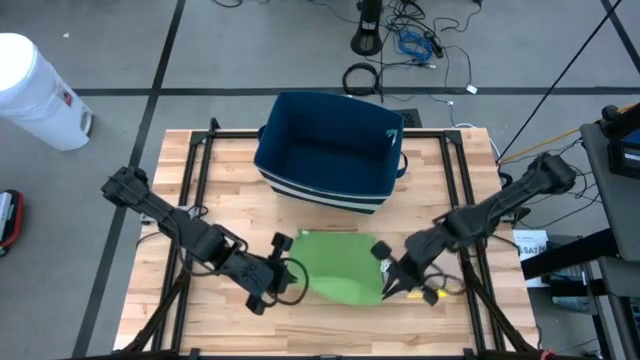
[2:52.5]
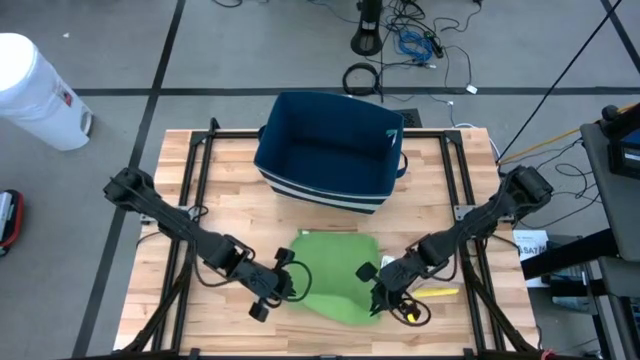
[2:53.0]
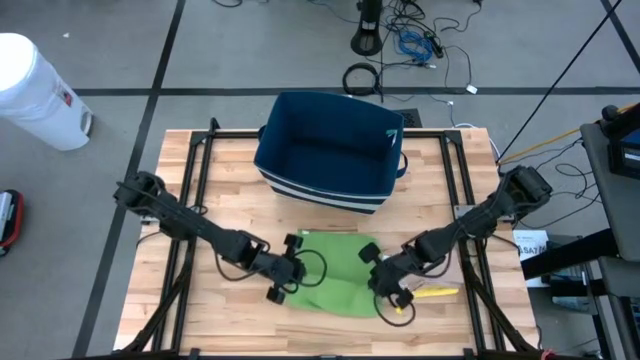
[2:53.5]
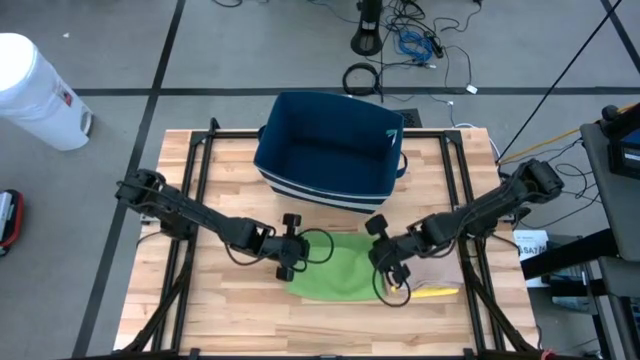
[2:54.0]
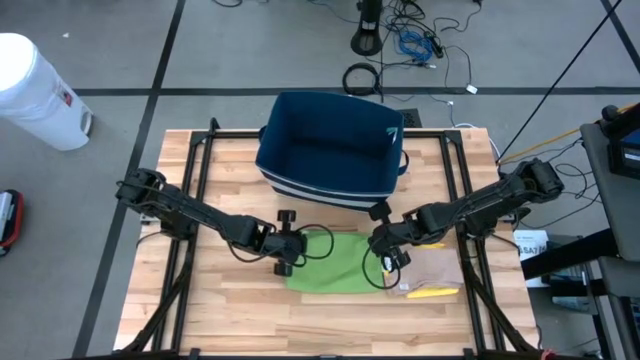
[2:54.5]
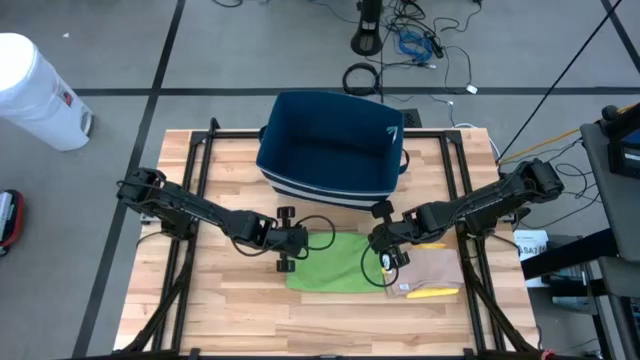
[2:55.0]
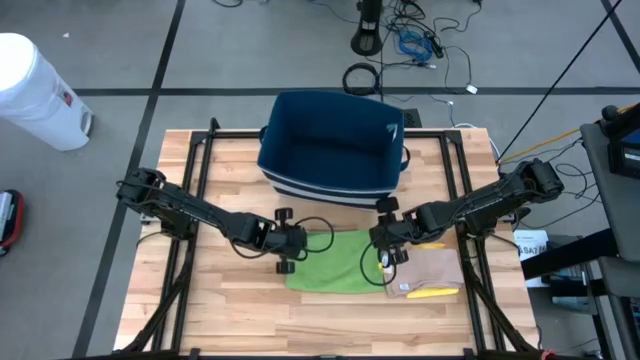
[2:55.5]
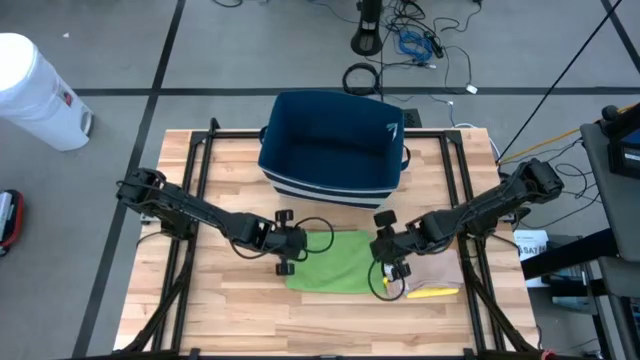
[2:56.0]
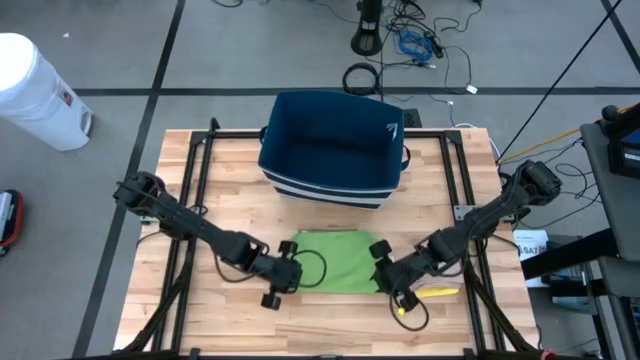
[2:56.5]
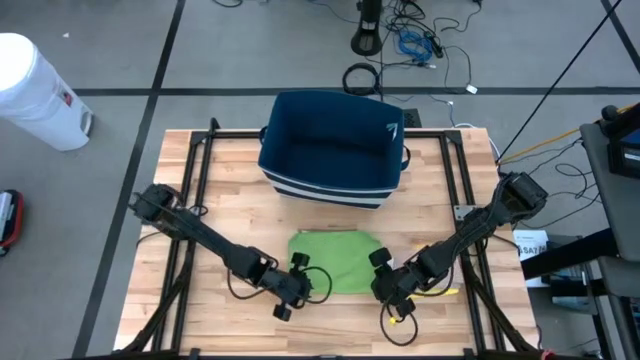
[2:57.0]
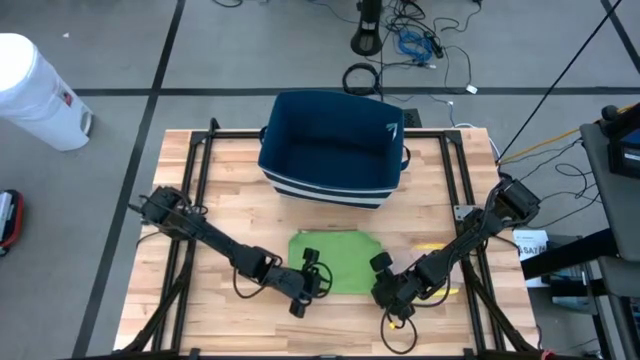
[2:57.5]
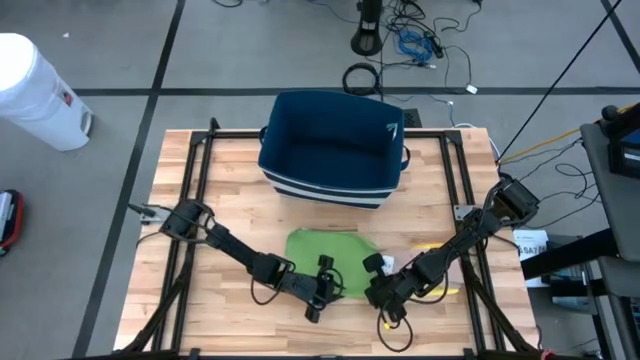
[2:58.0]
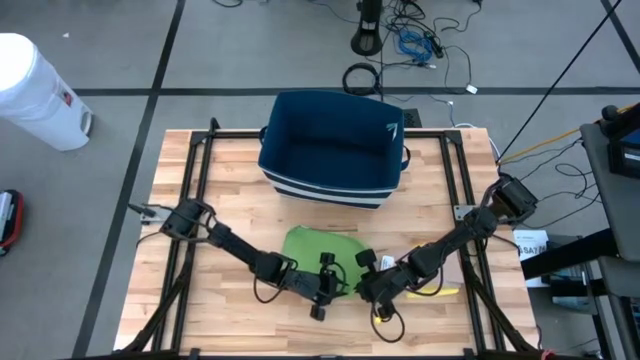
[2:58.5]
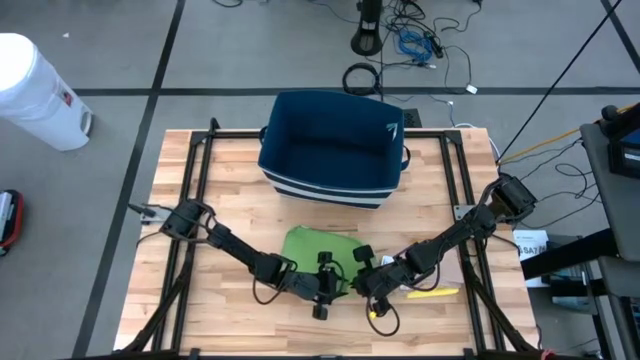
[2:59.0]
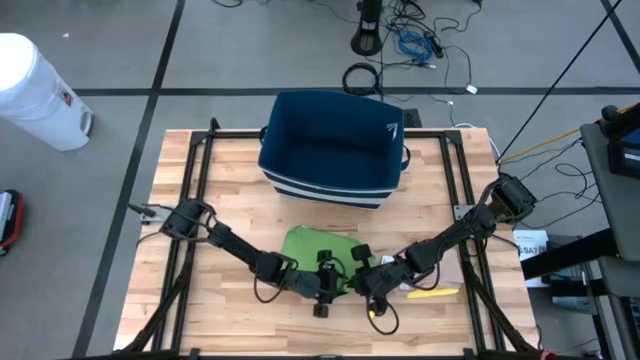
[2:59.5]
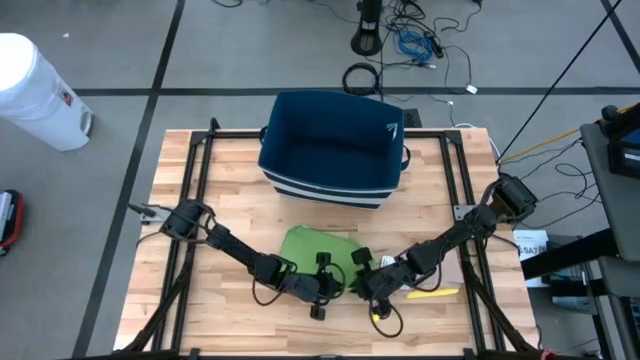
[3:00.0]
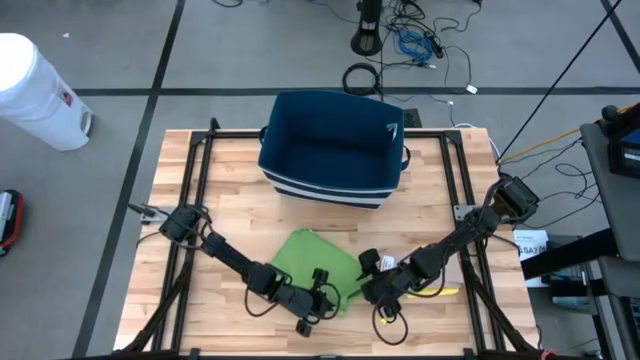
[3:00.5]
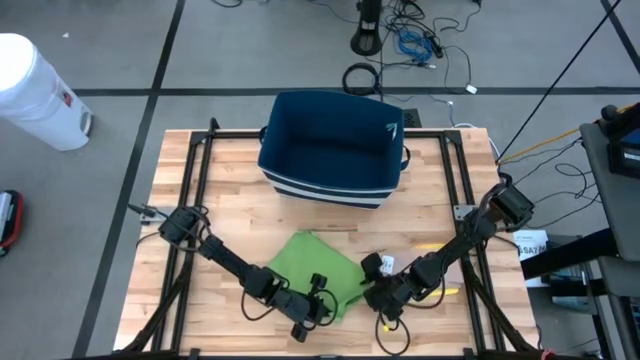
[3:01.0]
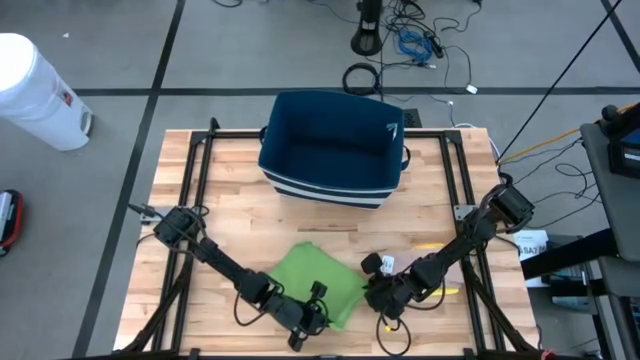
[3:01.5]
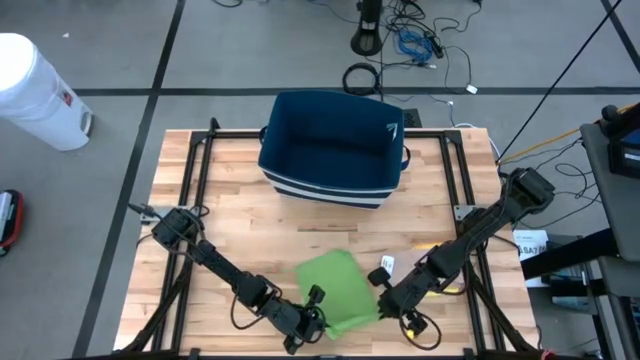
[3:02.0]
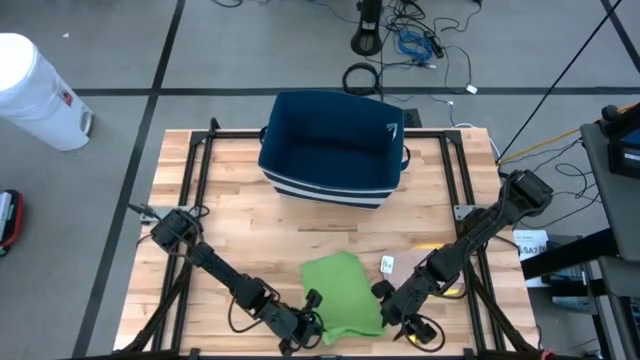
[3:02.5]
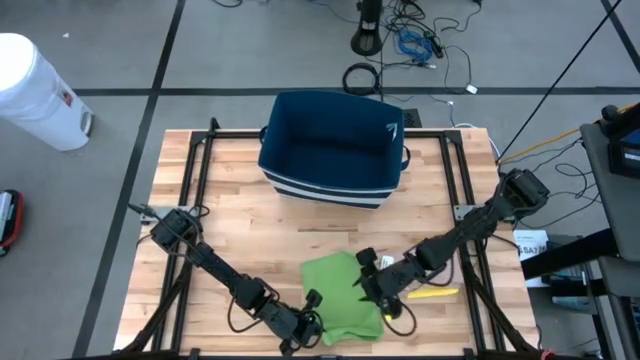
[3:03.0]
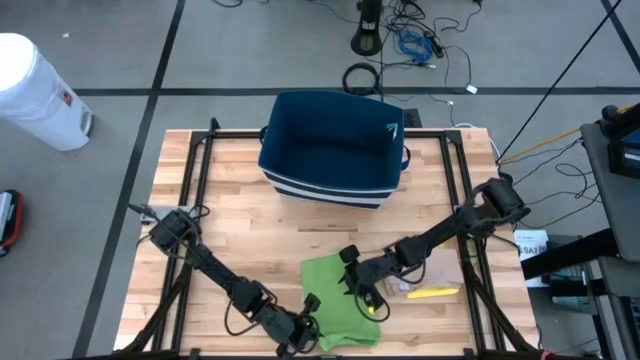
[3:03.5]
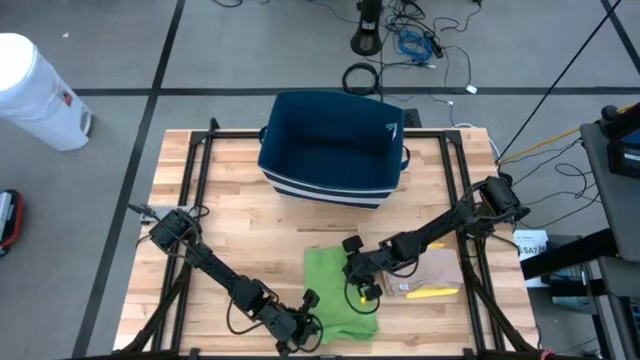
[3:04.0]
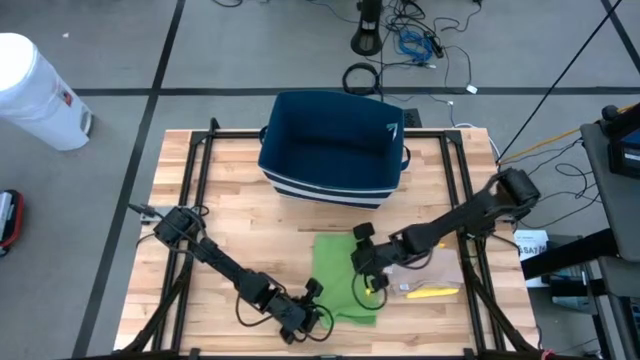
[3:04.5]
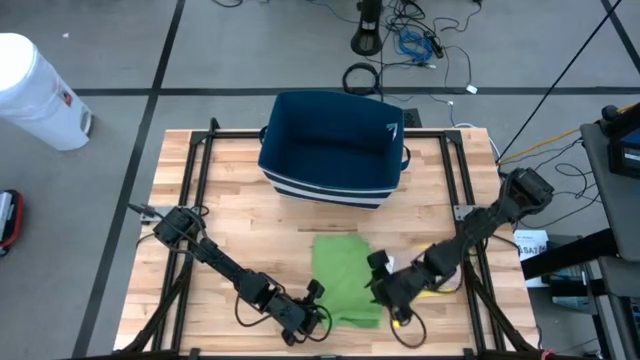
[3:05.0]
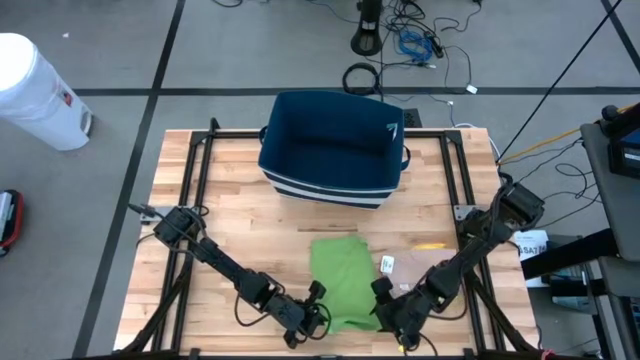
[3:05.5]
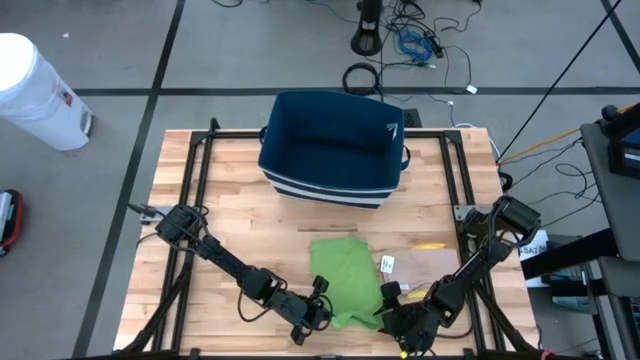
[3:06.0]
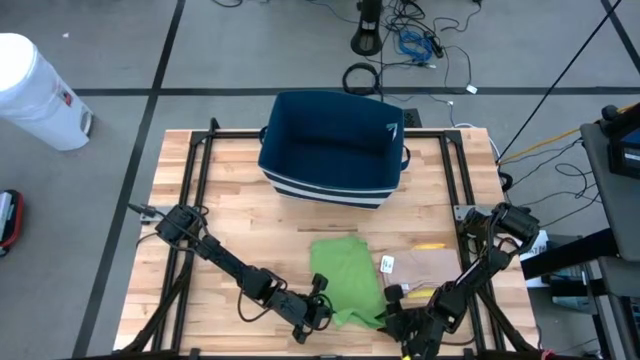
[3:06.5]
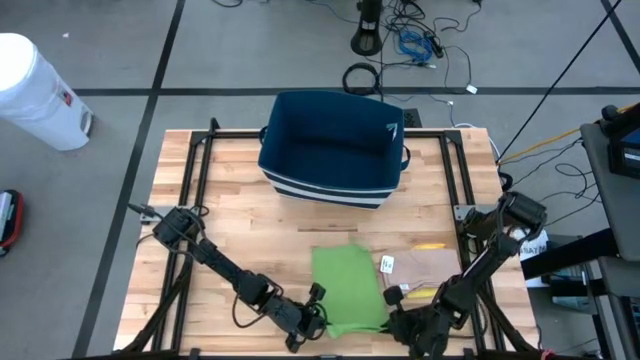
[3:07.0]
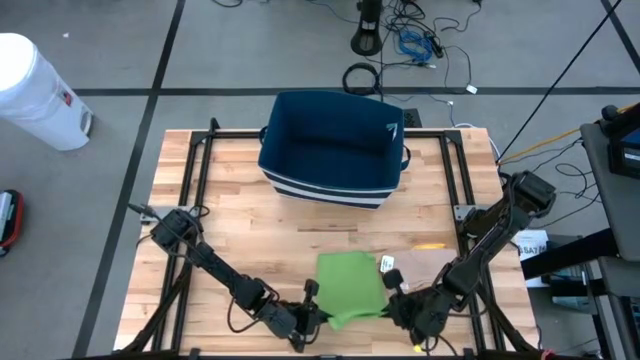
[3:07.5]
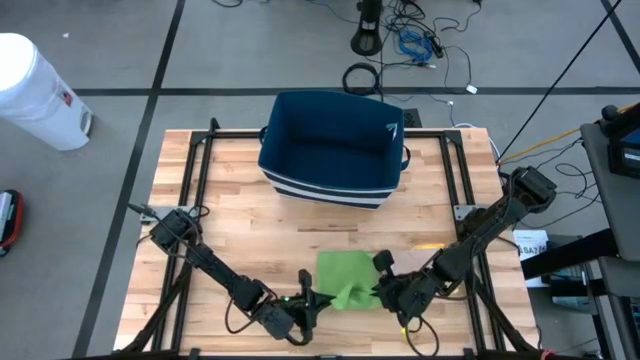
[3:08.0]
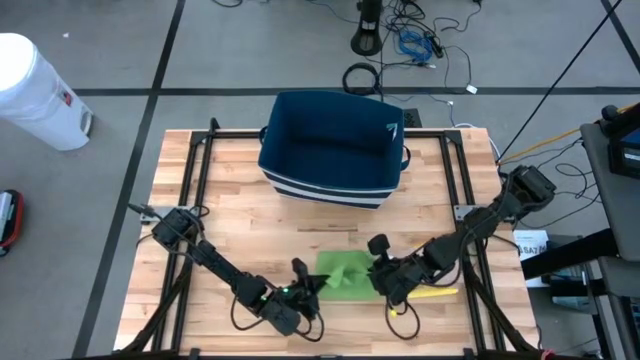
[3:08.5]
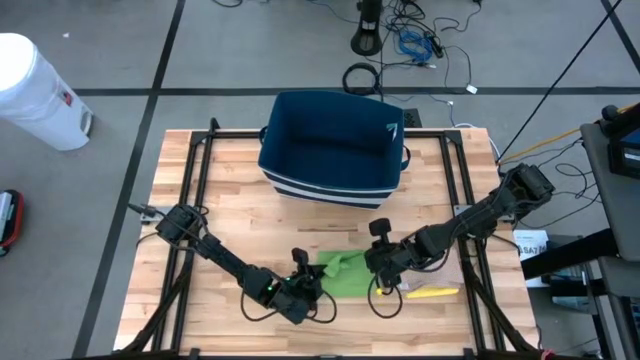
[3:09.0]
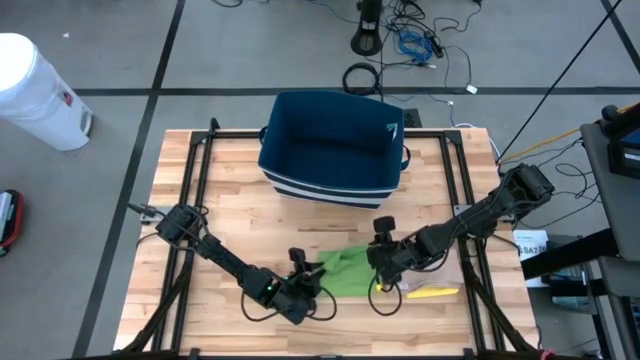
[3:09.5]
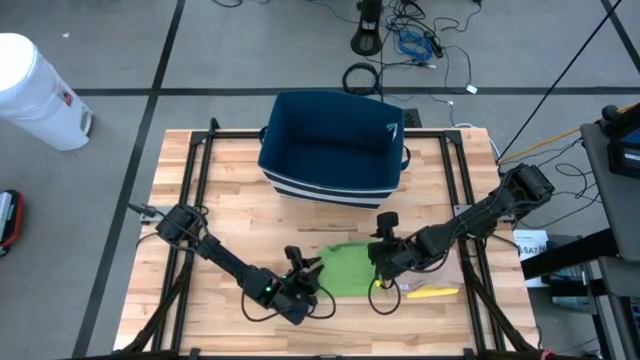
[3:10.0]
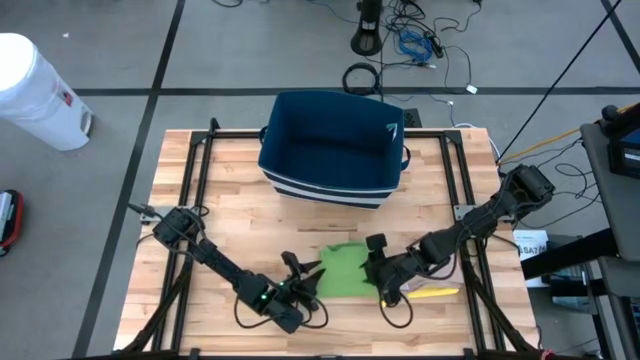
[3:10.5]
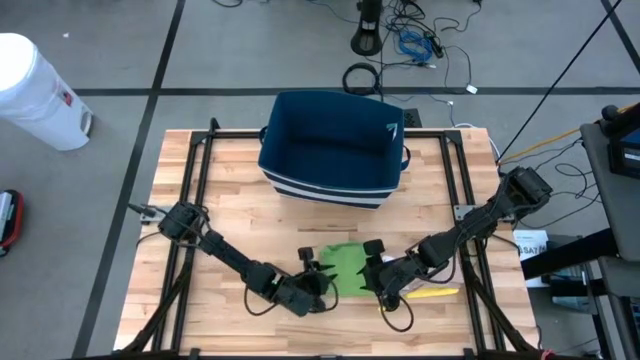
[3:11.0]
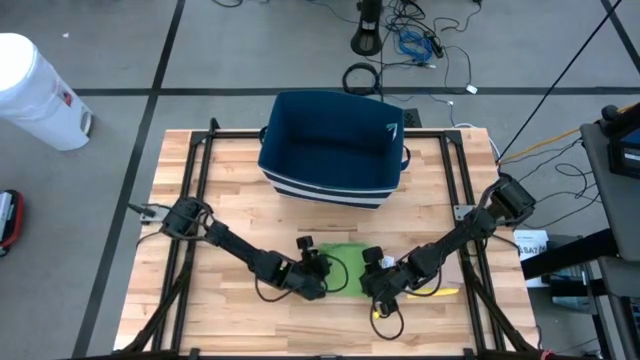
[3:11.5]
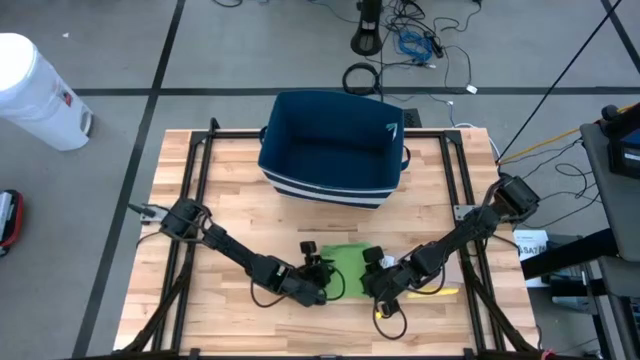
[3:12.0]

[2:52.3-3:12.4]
Task: Fold towel
Fold the green towel

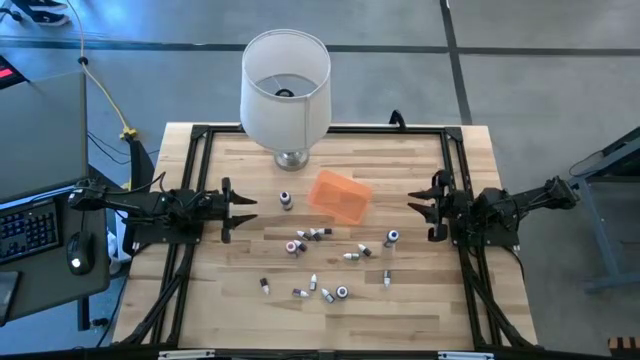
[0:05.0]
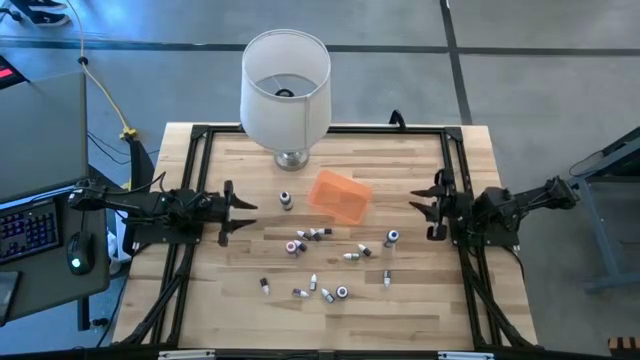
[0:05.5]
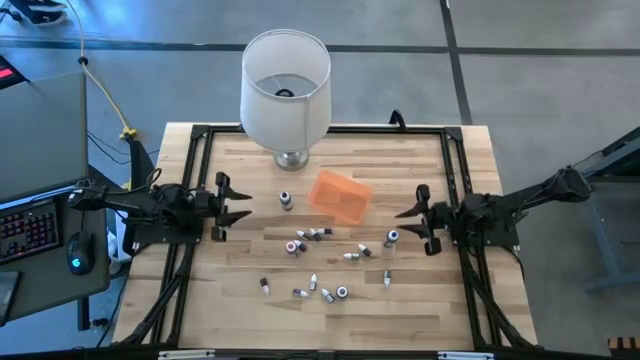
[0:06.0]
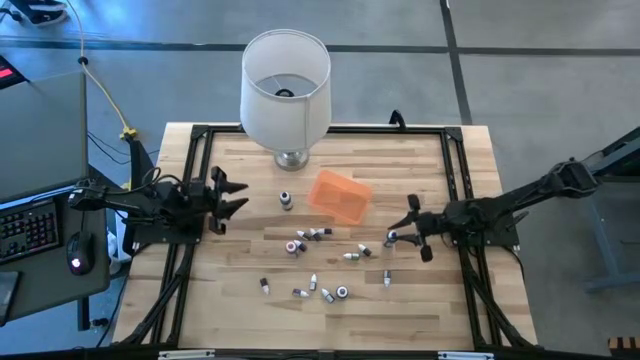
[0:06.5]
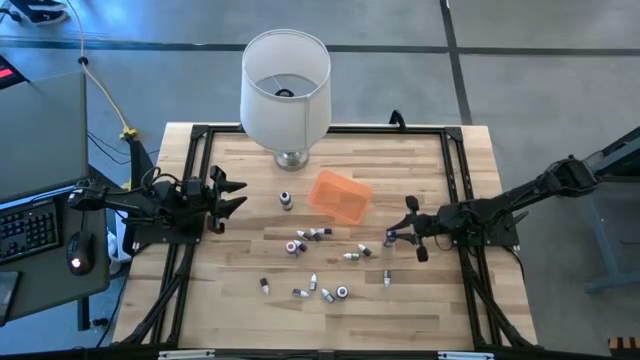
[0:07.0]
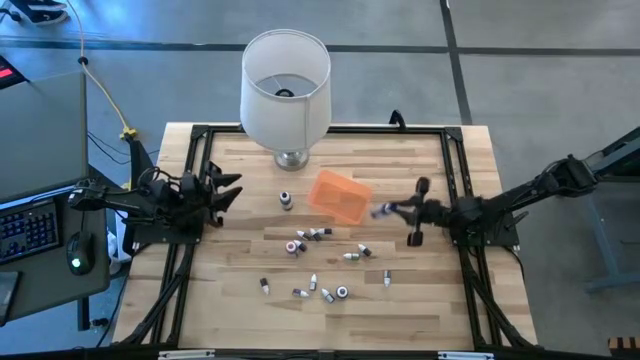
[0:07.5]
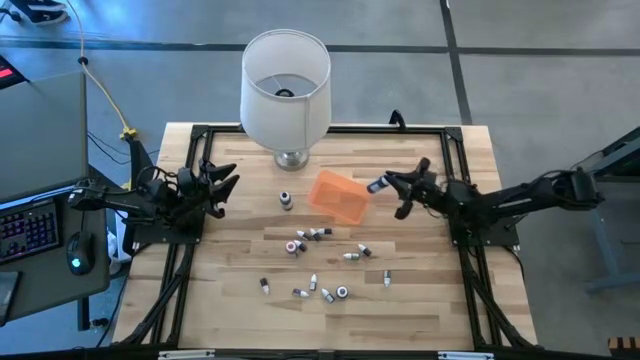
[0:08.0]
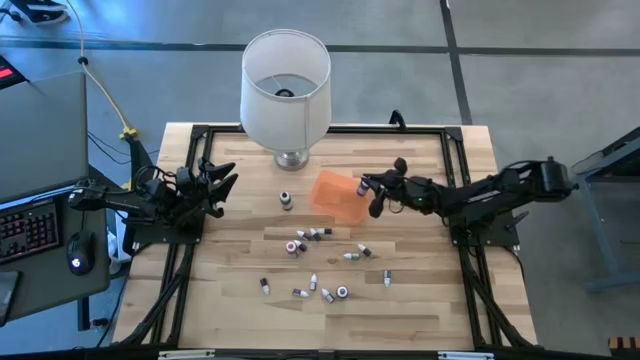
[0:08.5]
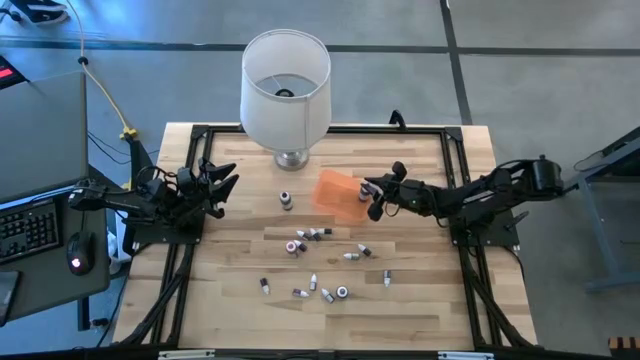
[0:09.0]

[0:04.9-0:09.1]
Task: Pick & Place food coloring
Put the large blue food coloring bottle into the orange bin
